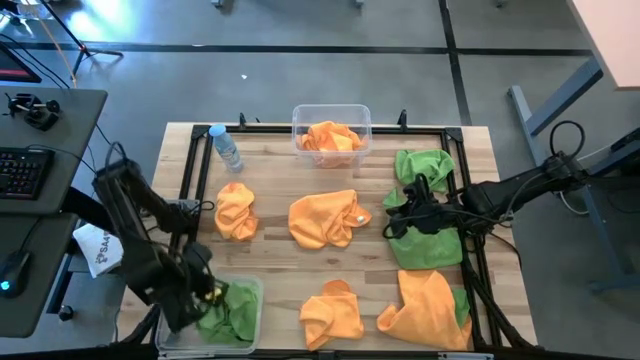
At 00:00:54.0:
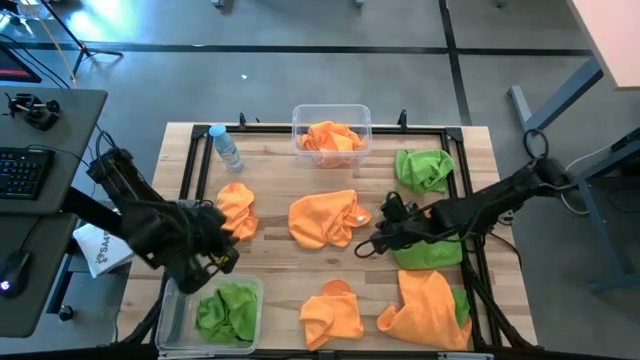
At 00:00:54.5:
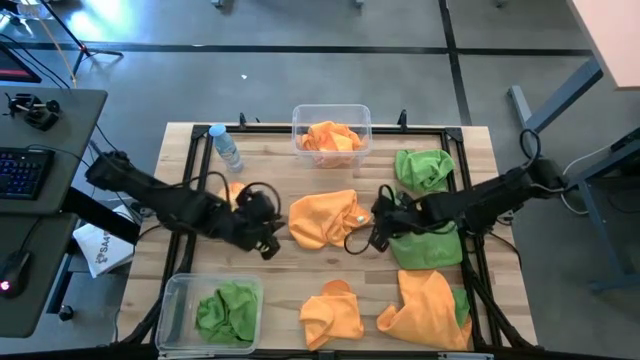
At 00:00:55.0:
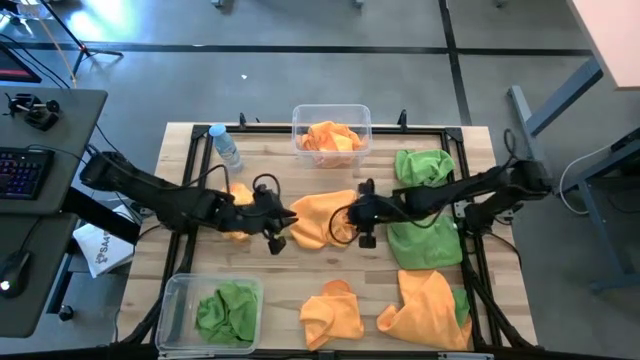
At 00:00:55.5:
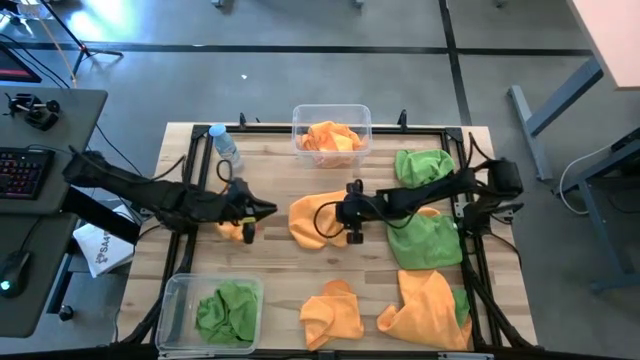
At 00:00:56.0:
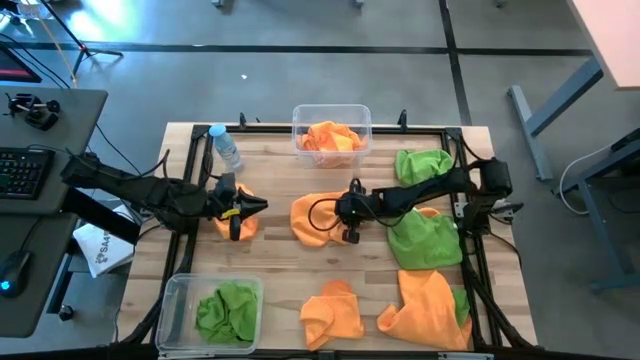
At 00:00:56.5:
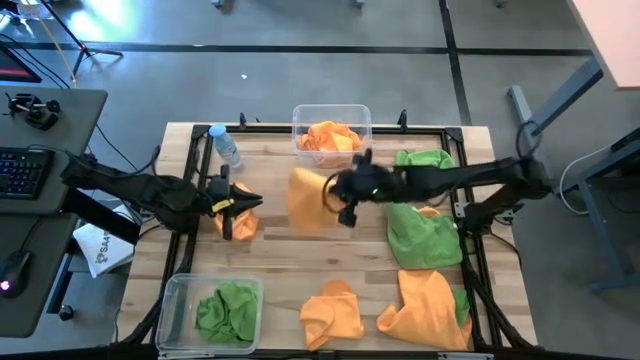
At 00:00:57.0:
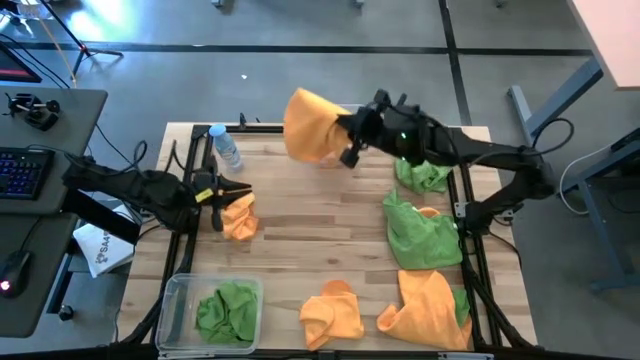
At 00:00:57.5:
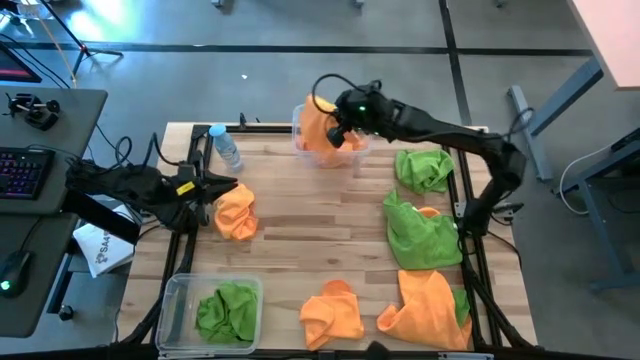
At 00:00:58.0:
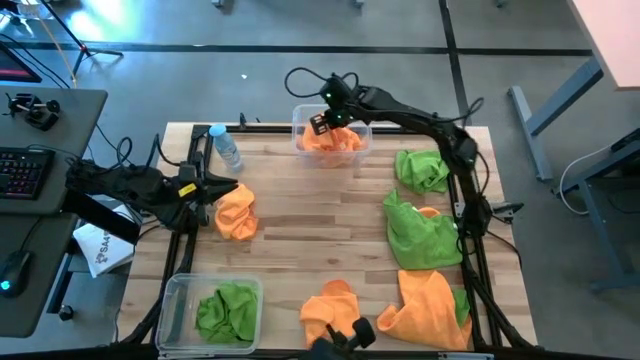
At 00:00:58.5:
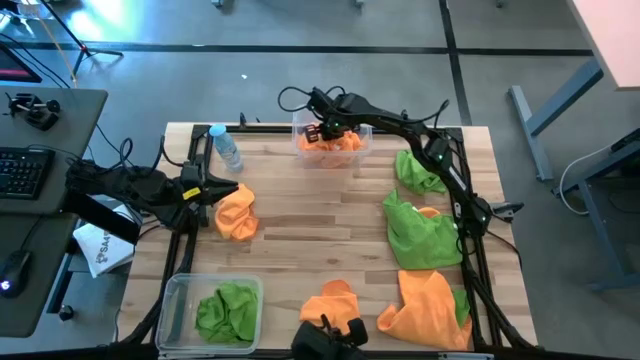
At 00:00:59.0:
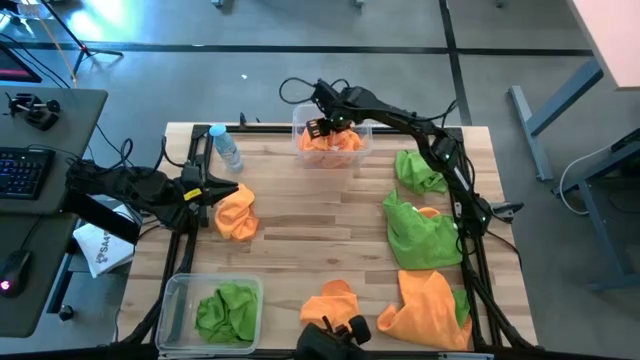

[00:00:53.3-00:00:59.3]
Task: Sort microfiber towel by color & place in baskets
Put the orange towel into the top transparent bin

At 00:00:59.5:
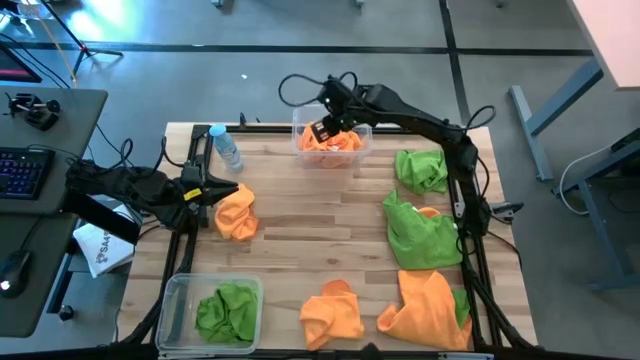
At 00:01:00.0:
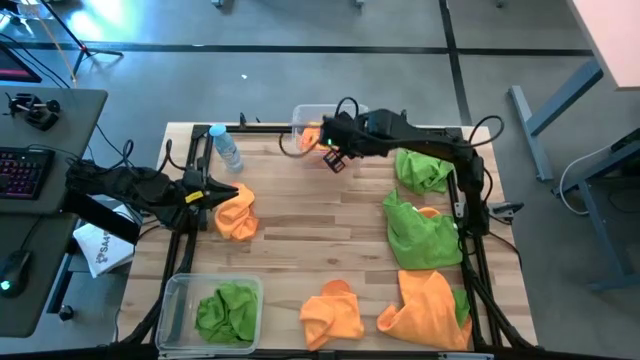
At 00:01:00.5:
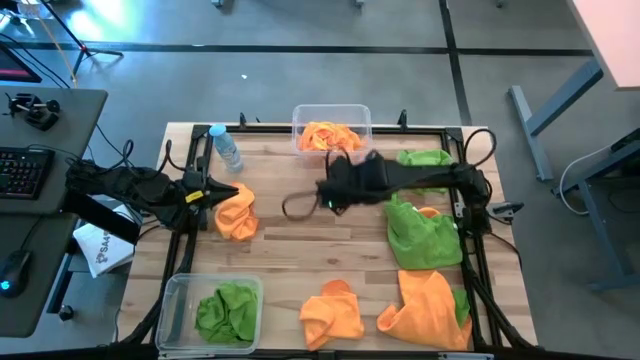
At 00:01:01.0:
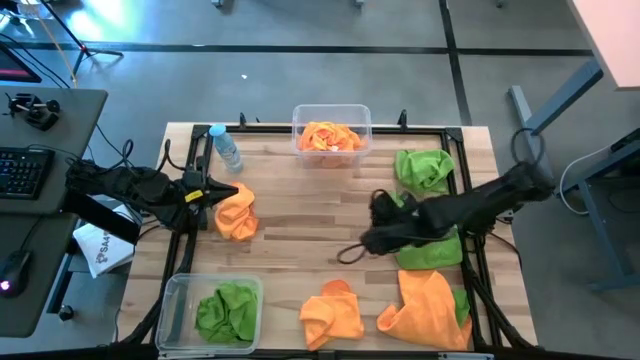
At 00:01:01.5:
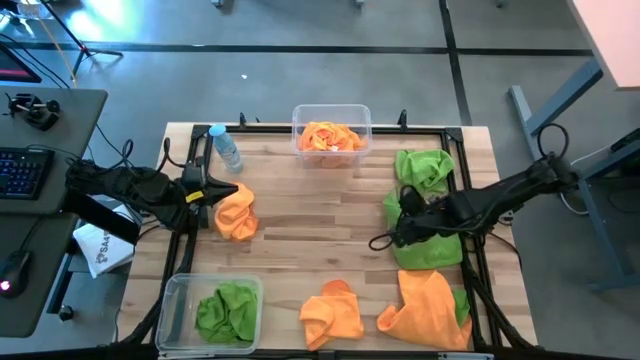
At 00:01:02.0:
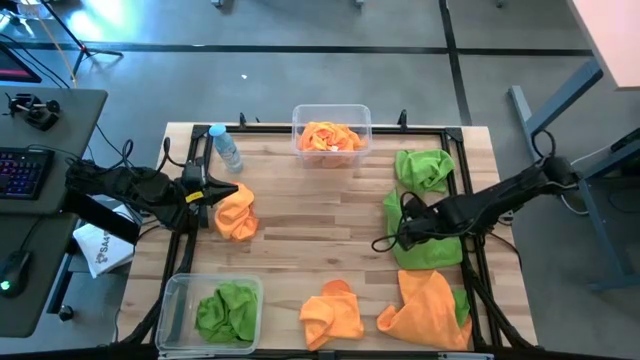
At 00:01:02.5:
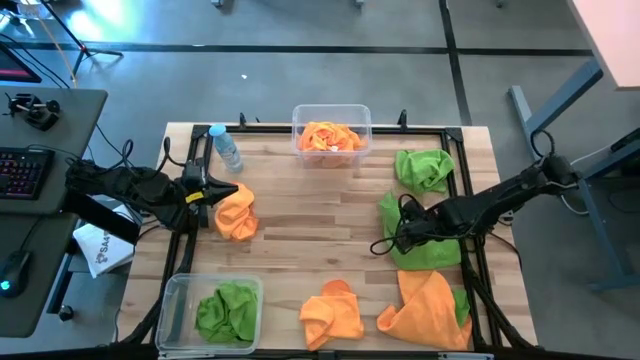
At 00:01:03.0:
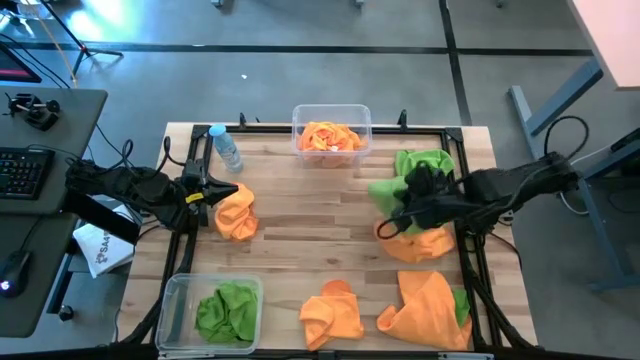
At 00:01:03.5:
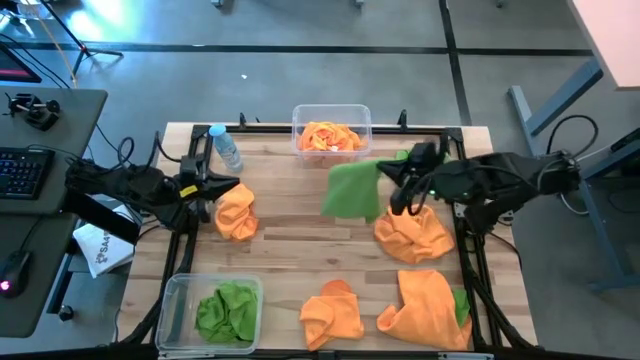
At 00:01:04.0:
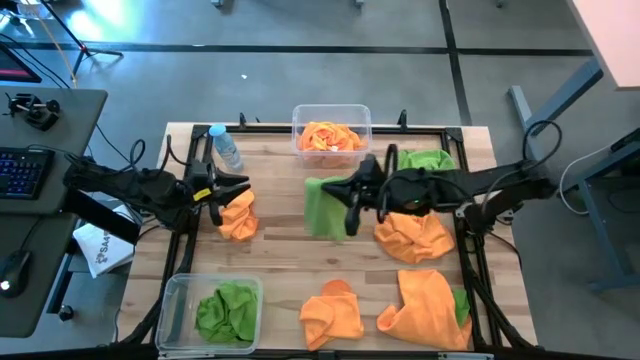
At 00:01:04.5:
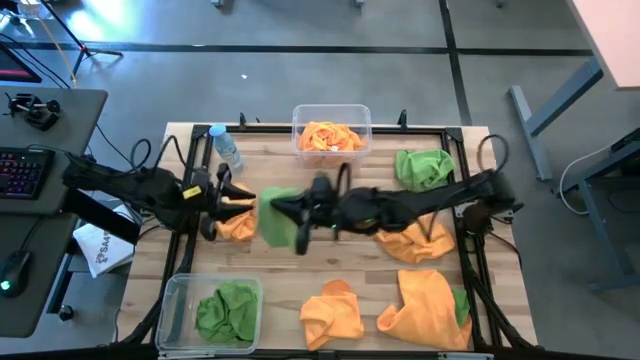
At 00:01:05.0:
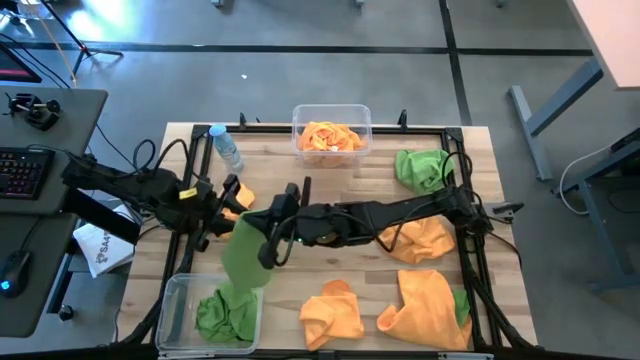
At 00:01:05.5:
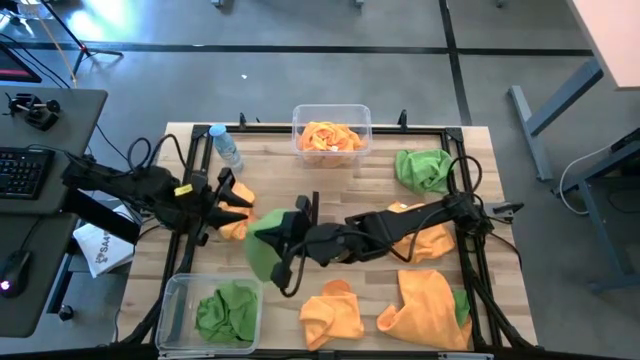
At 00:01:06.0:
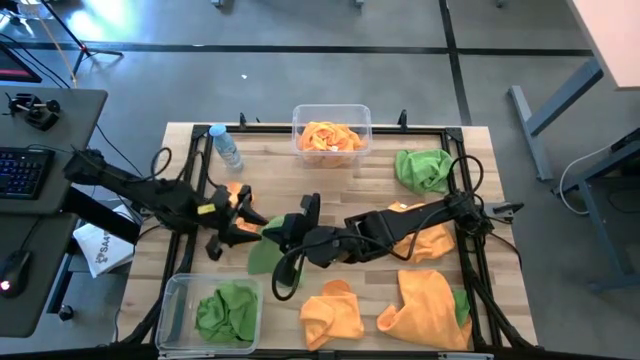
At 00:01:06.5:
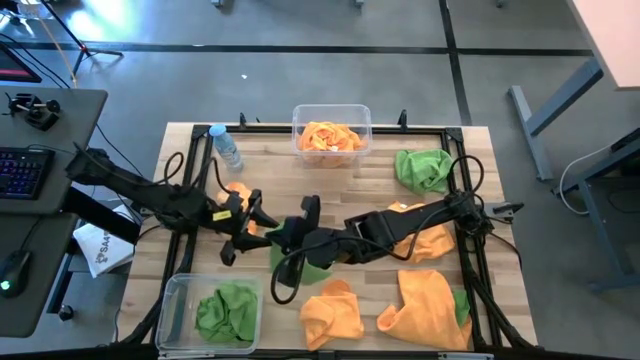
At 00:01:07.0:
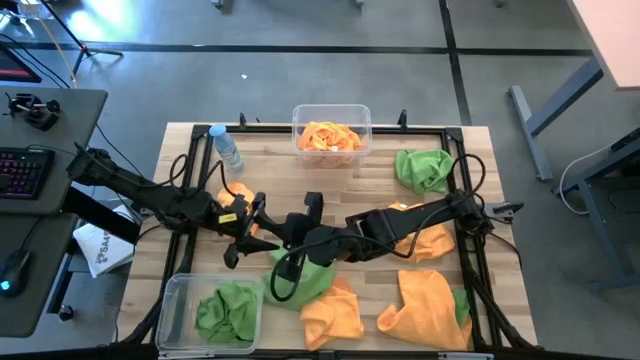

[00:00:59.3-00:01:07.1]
Put the green towel into the bottom transparent bin

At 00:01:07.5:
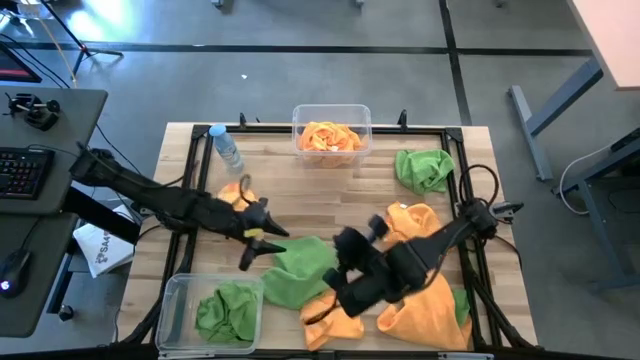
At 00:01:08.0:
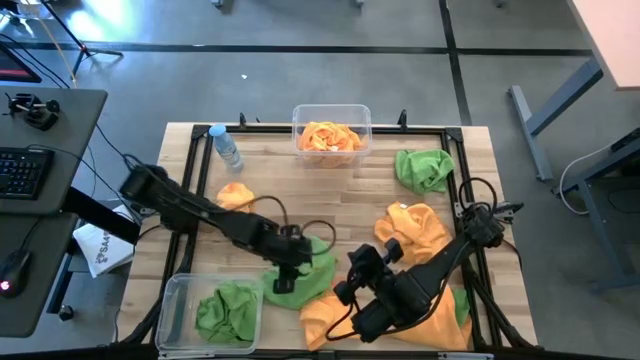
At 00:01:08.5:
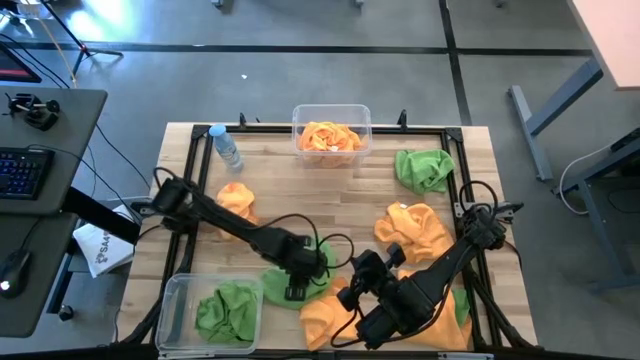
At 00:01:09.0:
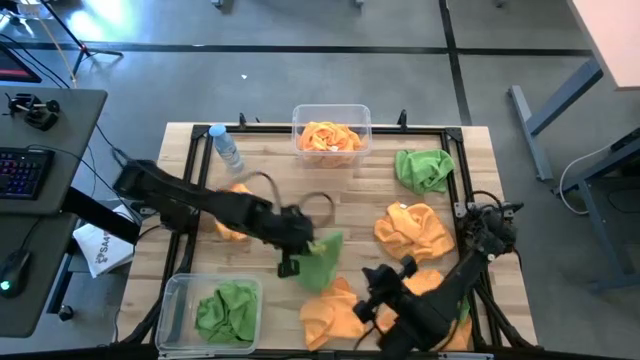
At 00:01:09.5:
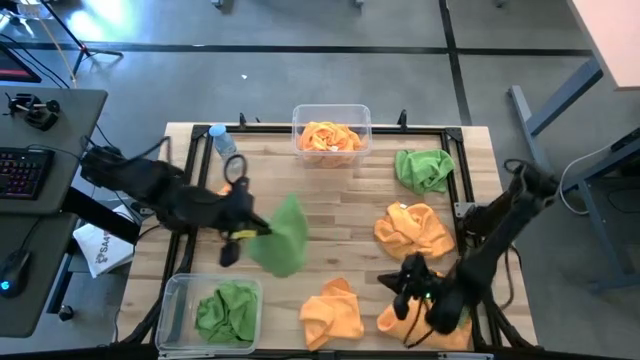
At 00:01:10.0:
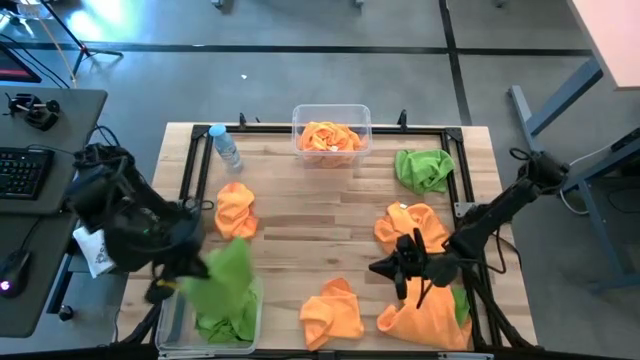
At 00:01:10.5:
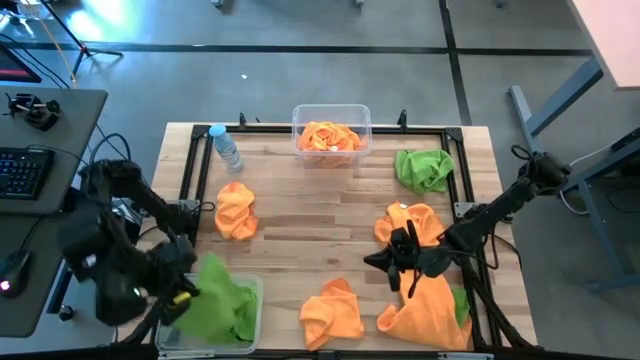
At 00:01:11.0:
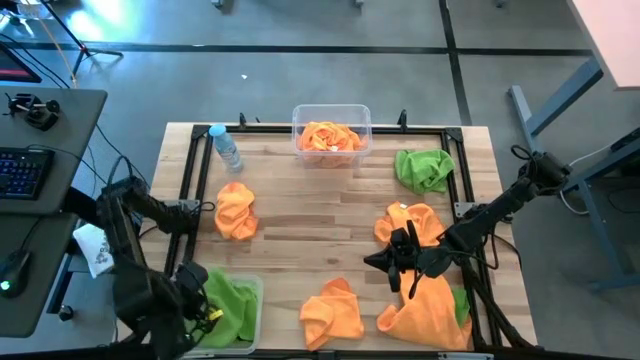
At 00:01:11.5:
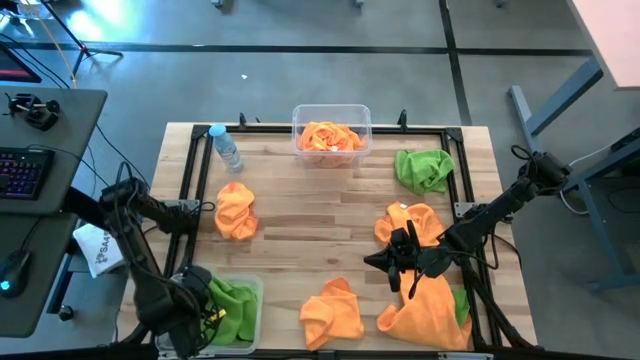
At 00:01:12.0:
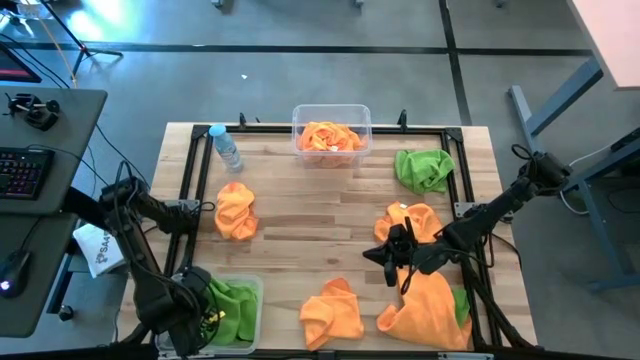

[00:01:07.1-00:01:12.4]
Put the green towel into the bottom transparent bin

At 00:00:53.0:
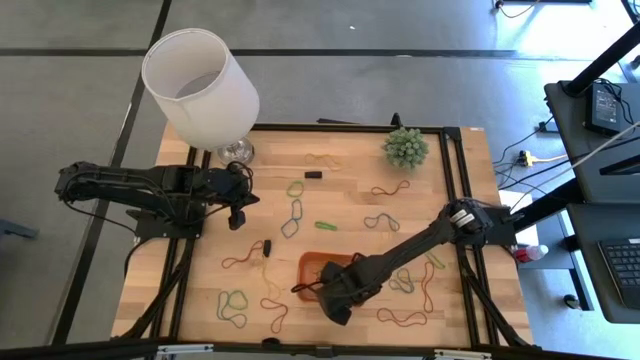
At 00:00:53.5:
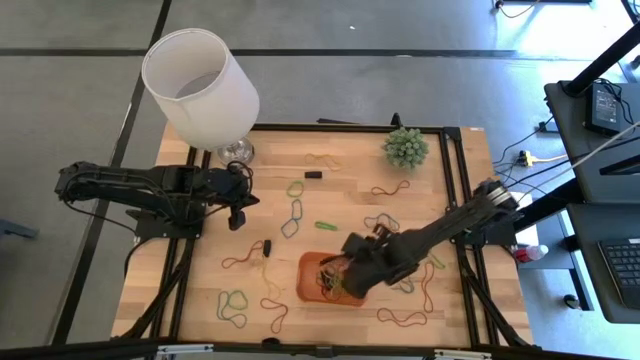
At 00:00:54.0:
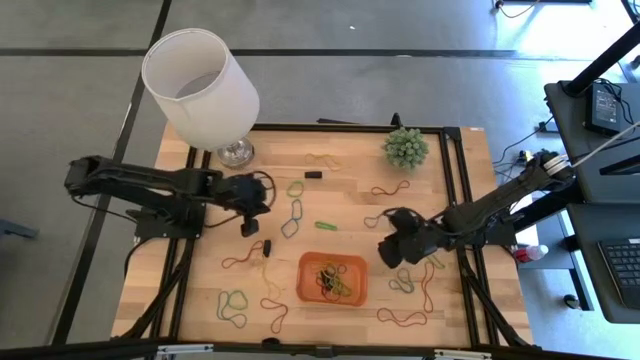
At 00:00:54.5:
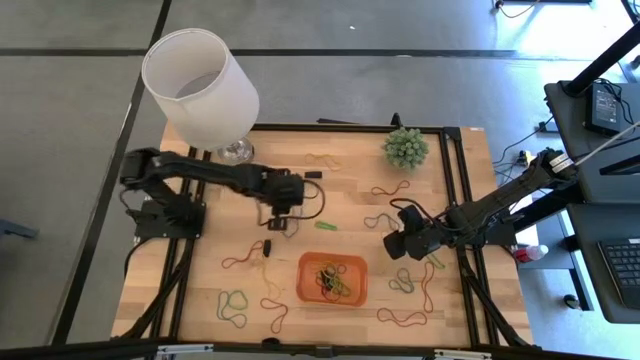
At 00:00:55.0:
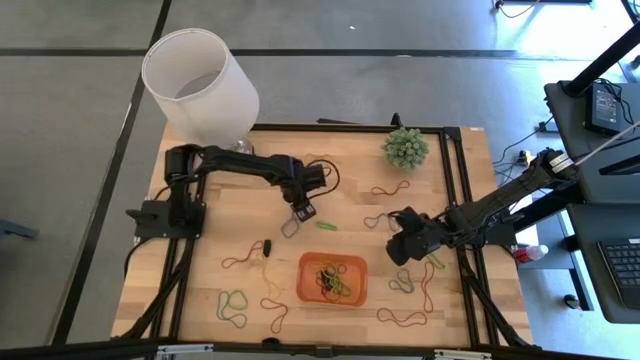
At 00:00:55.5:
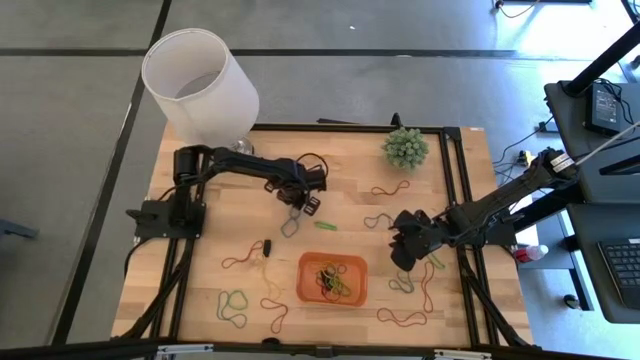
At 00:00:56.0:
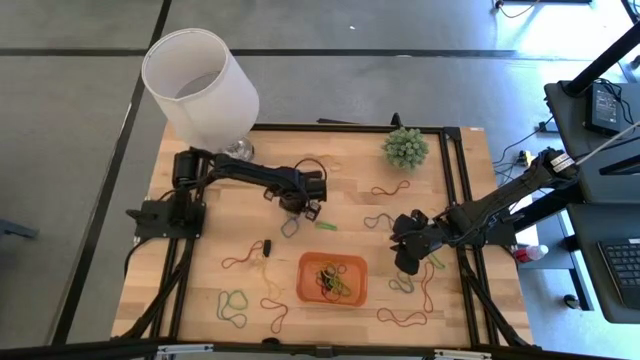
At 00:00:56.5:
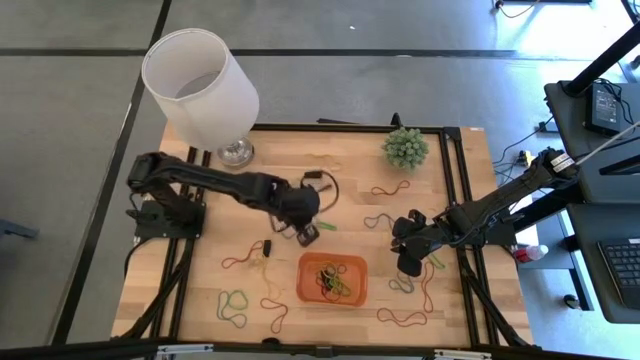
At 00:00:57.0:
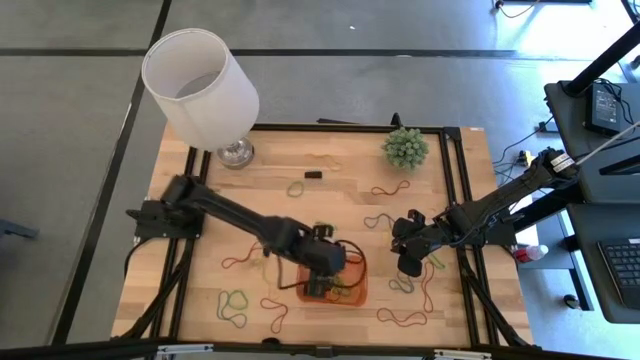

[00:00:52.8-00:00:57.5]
Task: Pick and place rubber bands into bin
Put the blue rubber band into the orange bin
